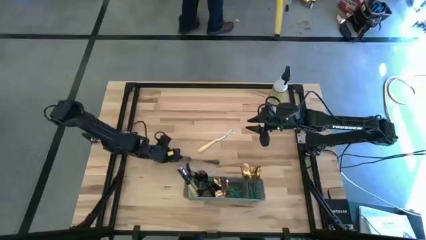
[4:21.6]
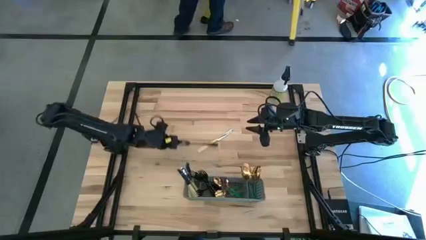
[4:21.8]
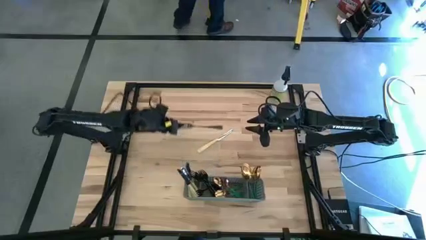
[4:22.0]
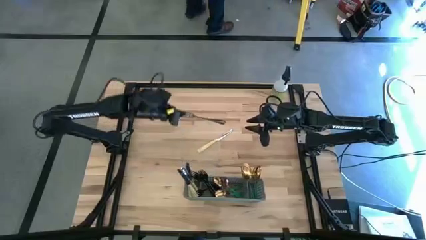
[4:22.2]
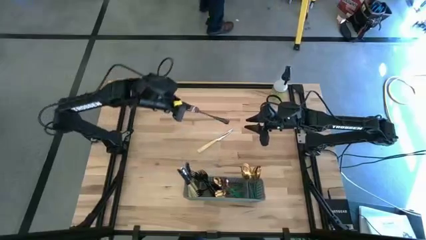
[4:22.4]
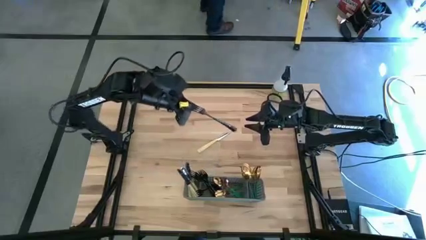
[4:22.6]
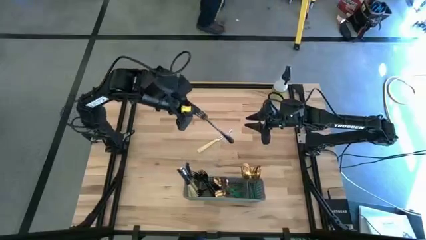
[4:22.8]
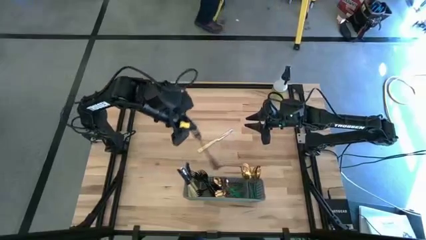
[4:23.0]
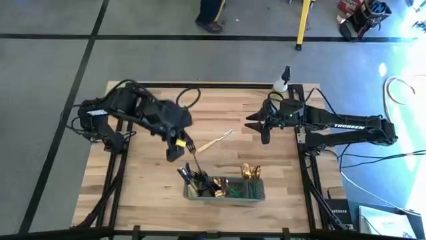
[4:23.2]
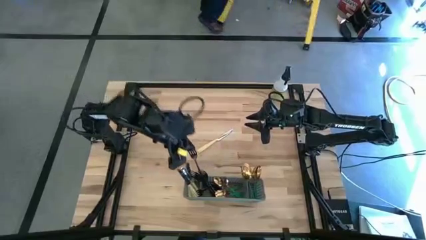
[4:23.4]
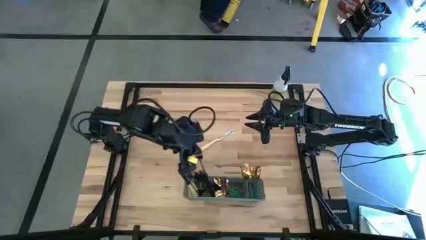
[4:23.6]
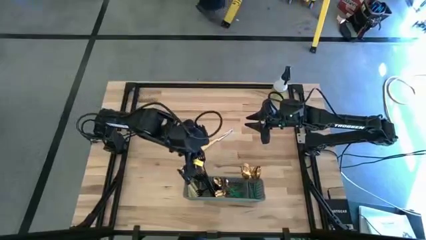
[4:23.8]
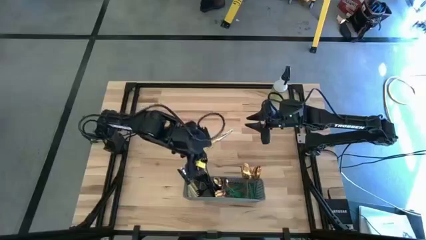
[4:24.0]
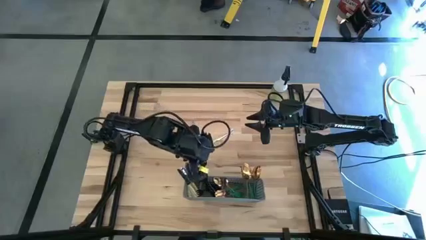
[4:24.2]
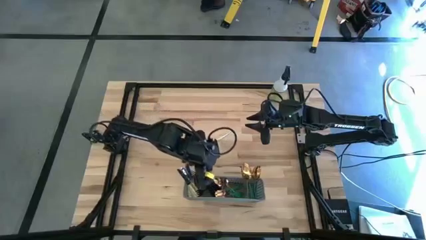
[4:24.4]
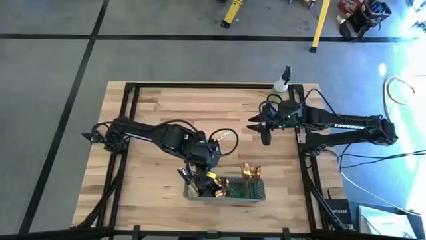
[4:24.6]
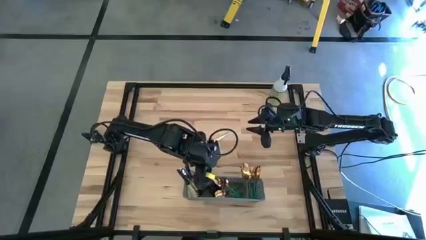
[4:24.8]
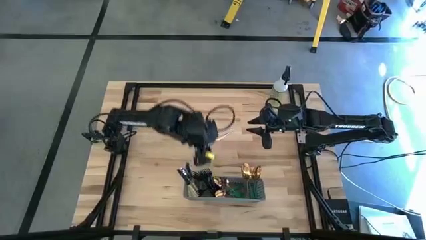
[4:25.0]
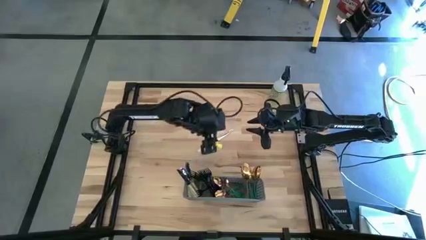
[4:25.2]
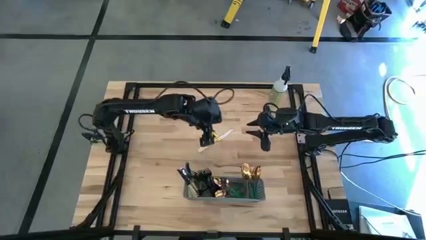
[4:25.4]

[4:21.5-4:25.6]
Task: Sort silverware
Put the black fork into the gray cutlery rack

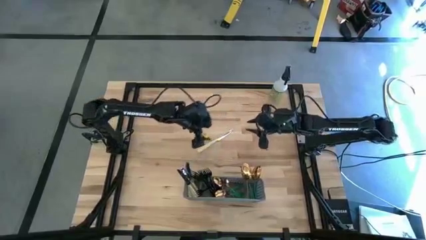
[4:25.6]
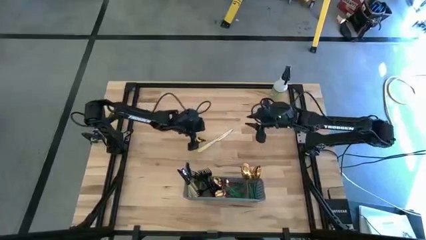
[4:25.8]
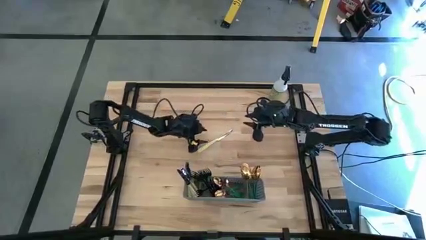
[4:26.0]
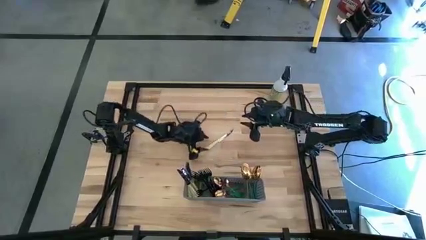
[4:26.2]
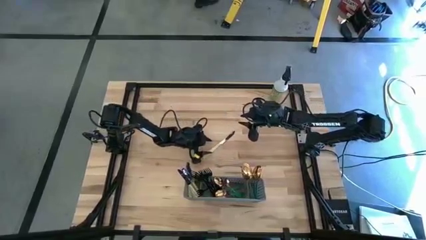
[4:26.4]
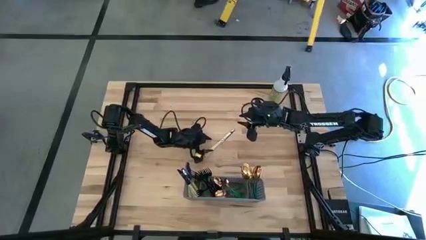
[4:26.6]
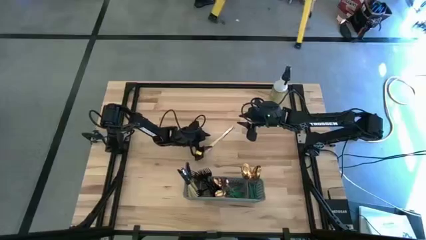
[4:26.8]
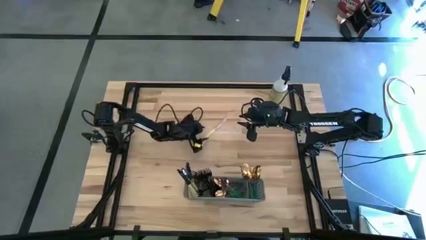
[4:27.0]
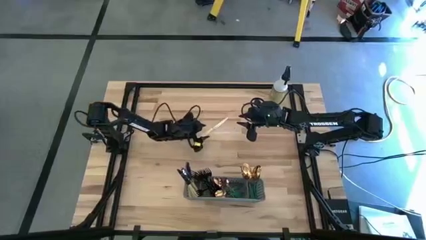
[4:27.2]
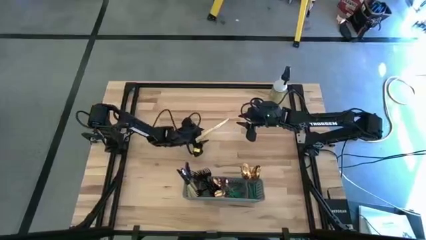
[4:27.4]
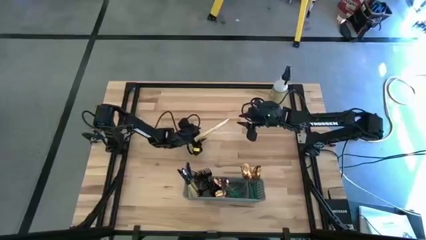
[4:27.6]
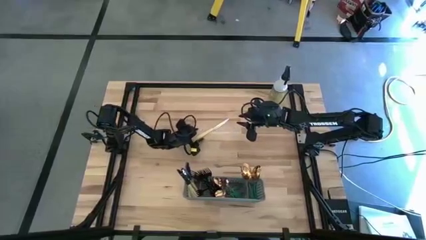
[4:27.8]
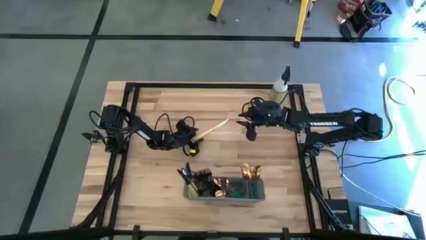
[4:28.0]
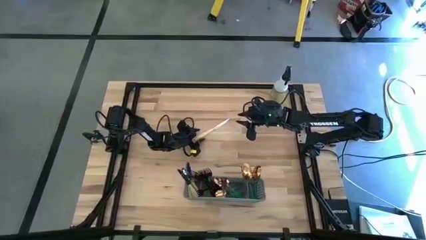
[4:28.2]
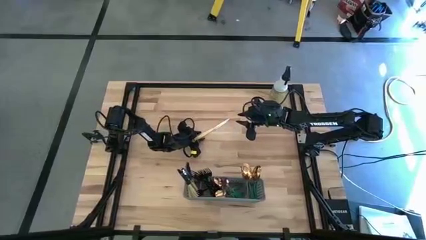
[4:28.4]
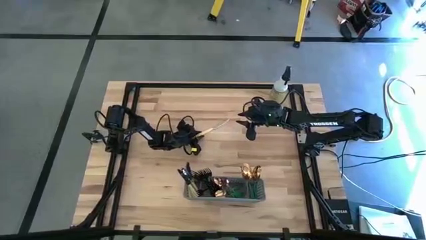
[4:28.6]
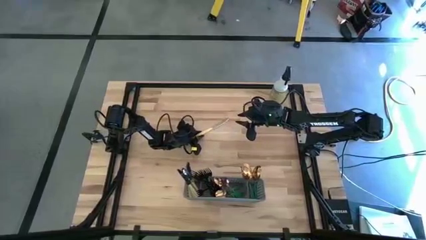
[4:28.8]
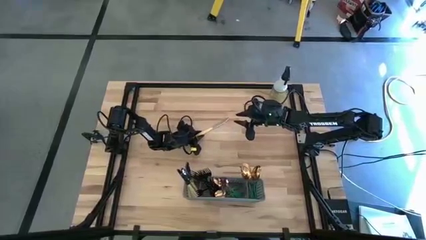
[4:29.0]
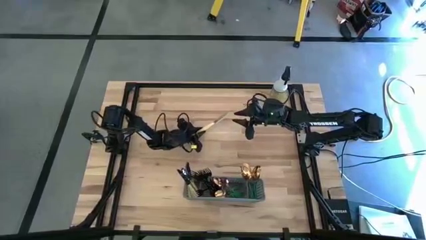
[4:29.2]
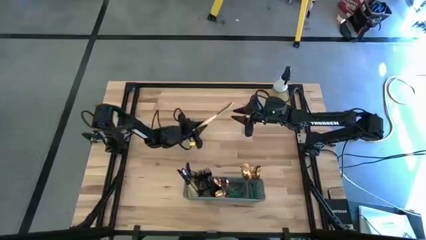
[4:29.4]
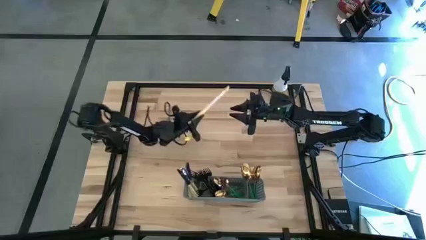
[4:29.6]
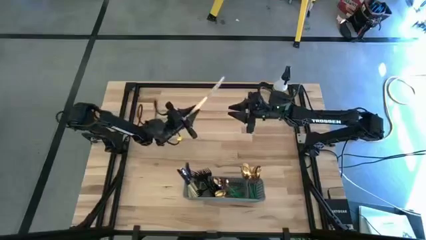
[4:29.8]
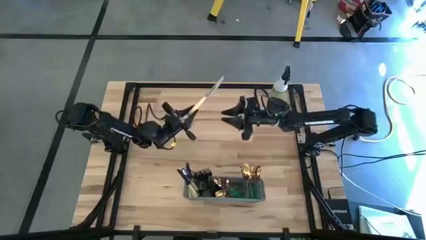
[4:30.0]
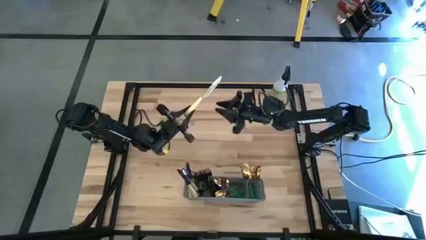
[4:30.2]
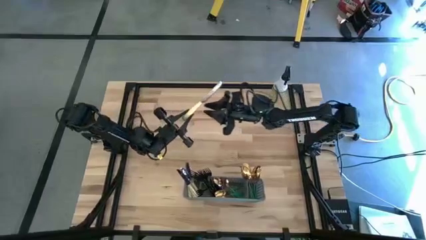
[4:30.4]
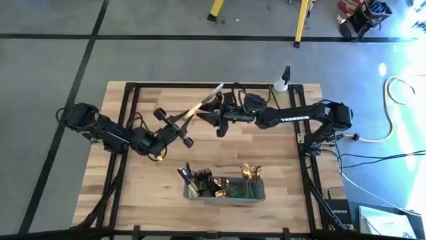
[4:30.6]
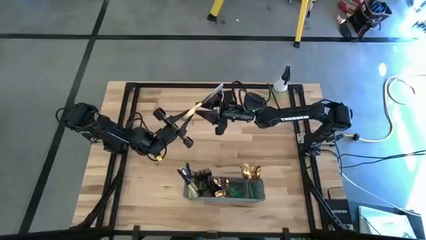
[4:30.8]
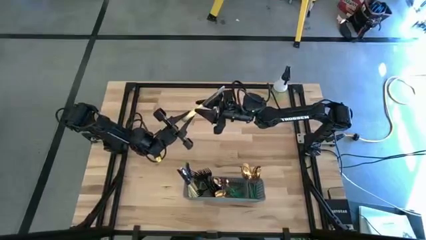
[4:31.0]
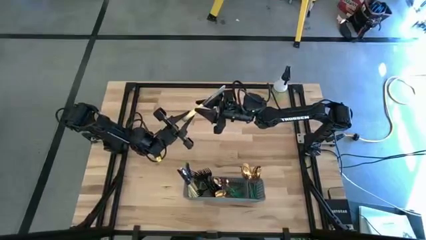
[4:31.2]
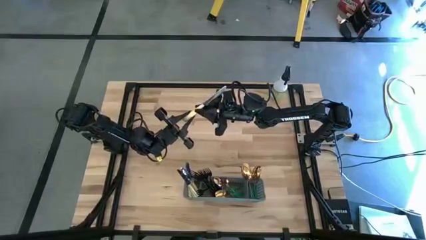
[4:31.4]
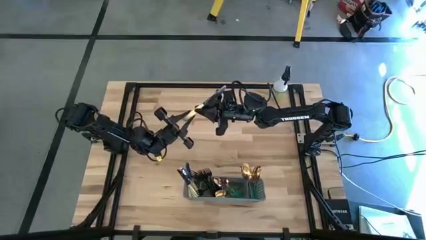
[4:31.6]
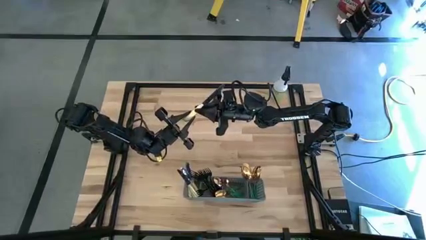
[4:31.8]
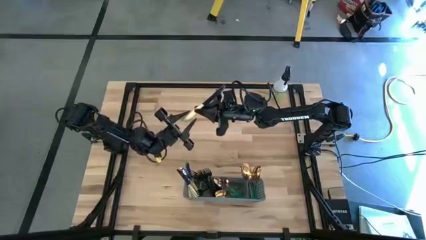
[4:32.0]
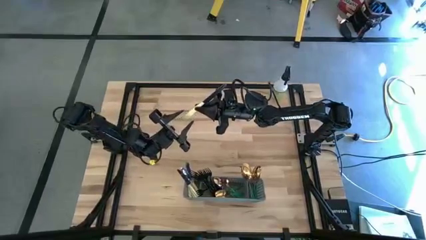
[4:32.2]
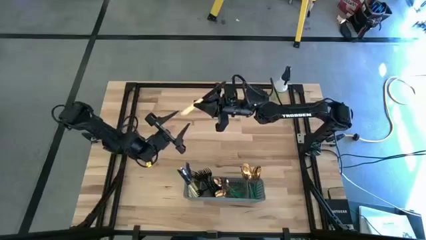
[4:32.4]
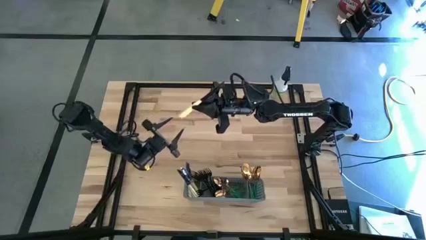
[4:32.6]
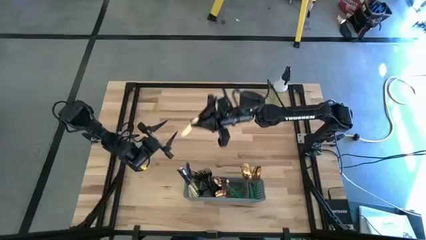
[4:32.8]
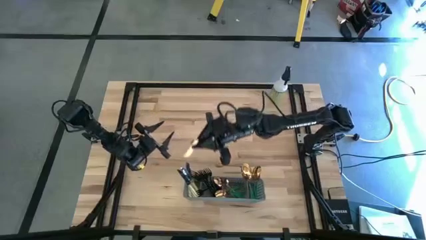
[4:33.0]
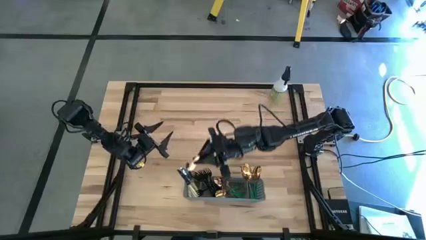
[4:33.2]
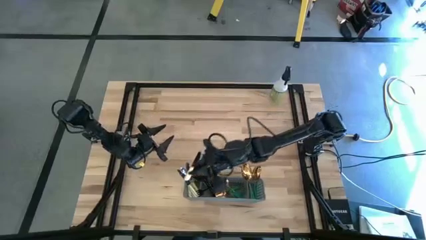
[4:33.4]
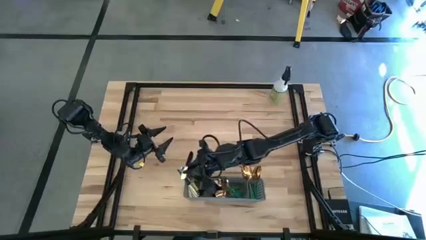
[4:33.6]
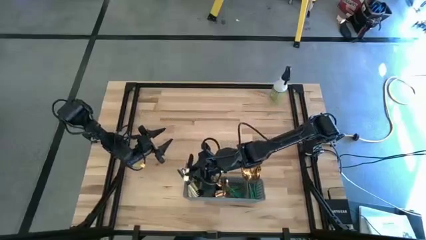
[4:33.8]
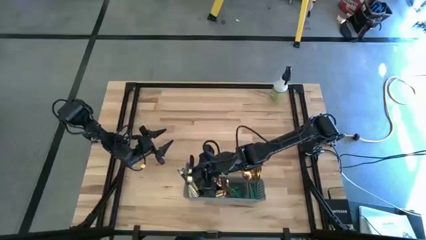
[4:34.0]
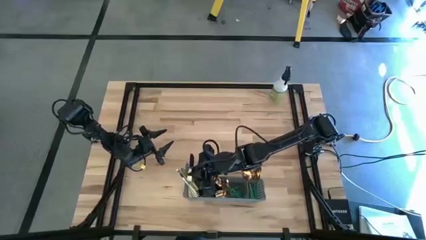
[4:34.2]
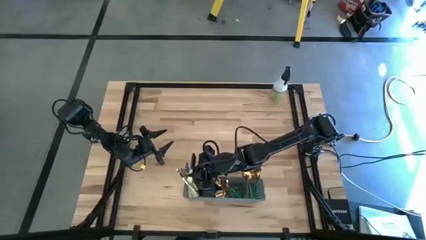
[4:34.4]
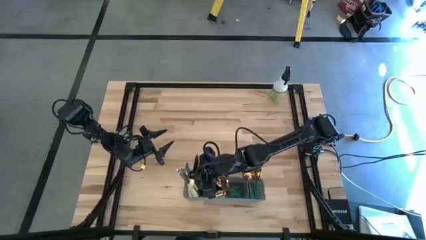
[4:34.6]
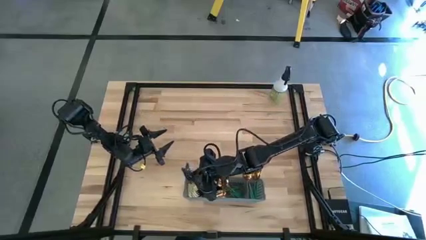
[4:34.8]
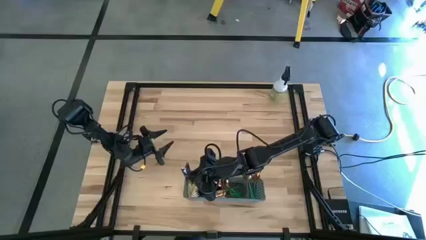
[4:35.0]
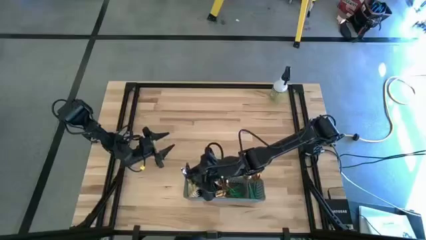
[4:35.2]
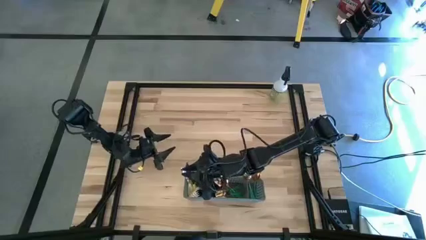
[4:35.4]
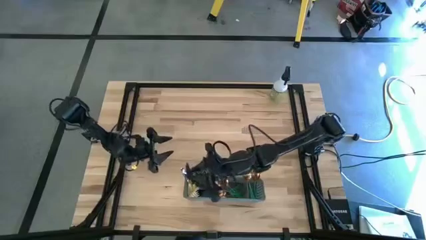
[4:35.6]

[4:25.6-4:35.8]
Put the yellow knife into the gray cutlery rack
